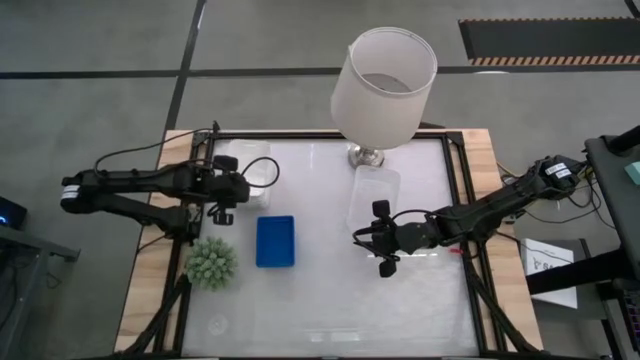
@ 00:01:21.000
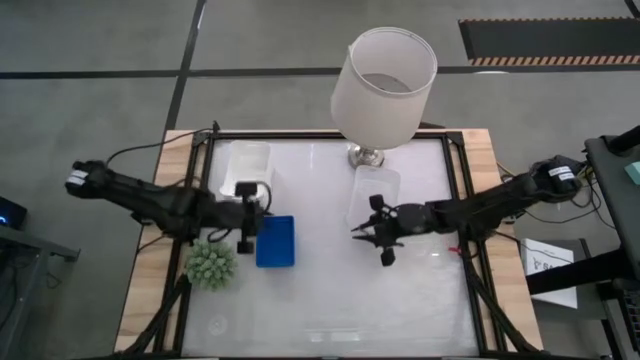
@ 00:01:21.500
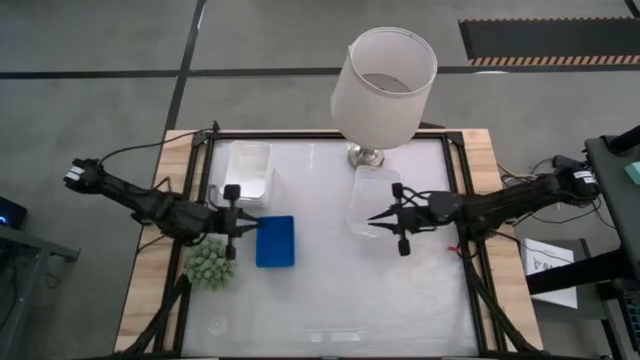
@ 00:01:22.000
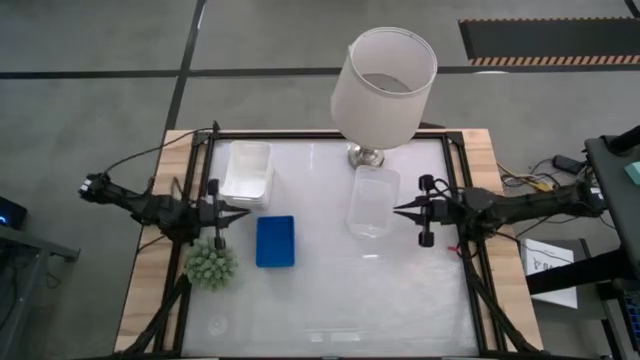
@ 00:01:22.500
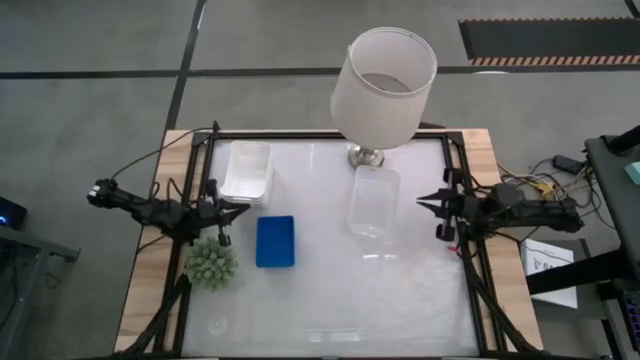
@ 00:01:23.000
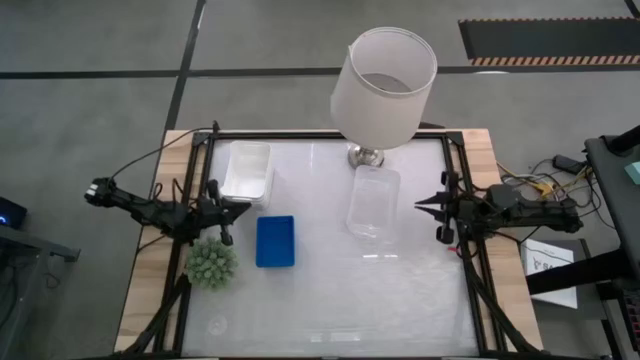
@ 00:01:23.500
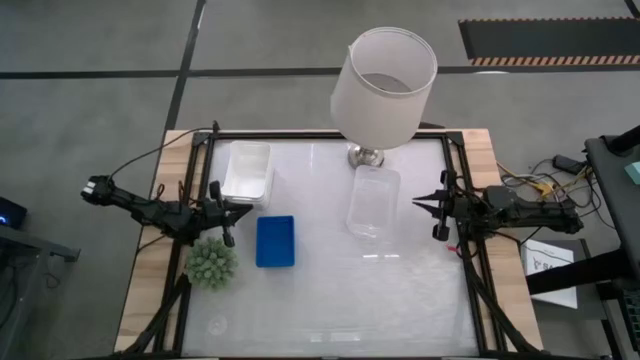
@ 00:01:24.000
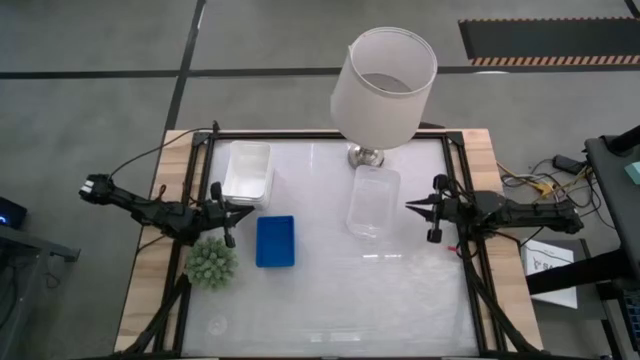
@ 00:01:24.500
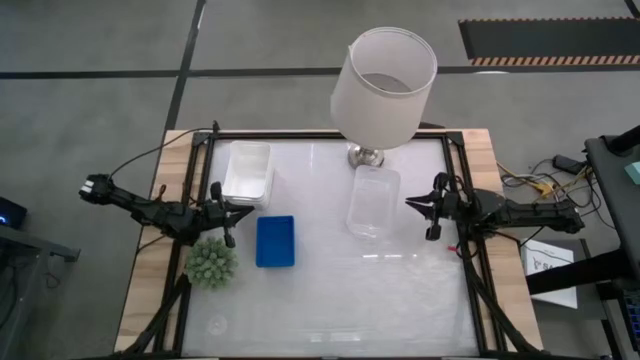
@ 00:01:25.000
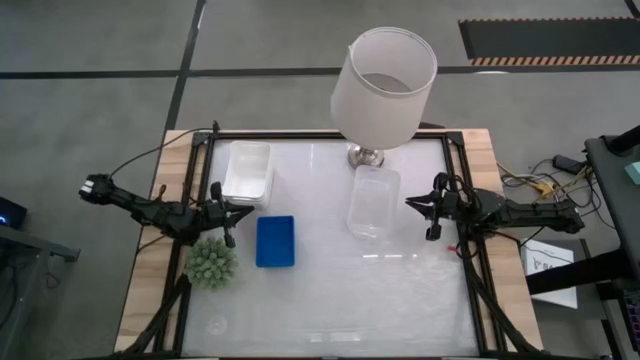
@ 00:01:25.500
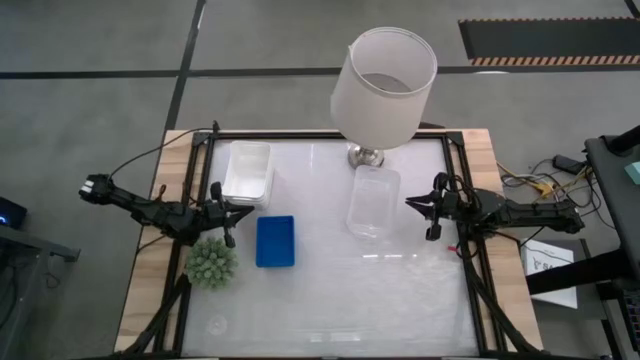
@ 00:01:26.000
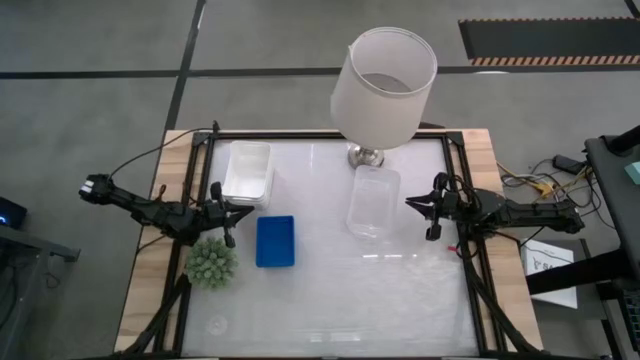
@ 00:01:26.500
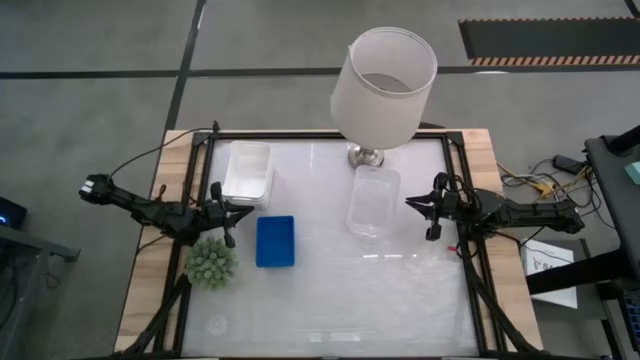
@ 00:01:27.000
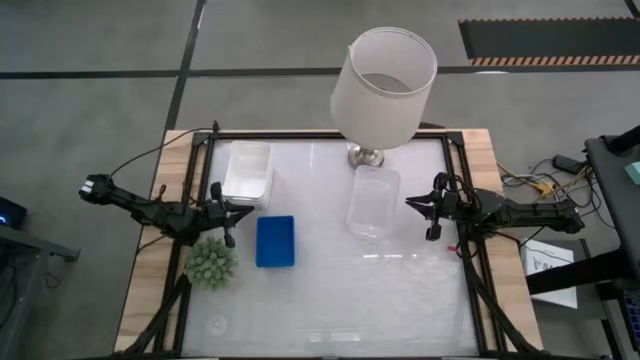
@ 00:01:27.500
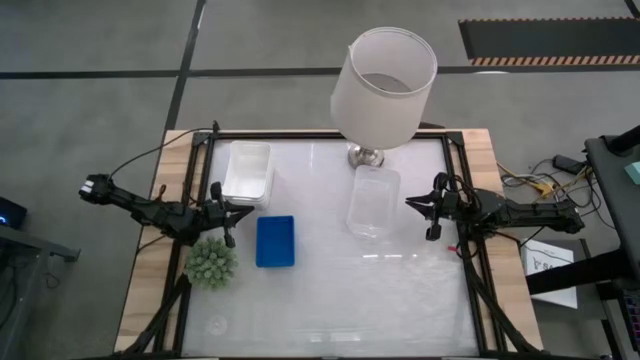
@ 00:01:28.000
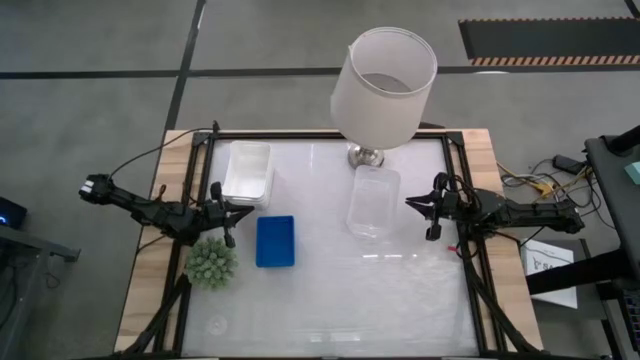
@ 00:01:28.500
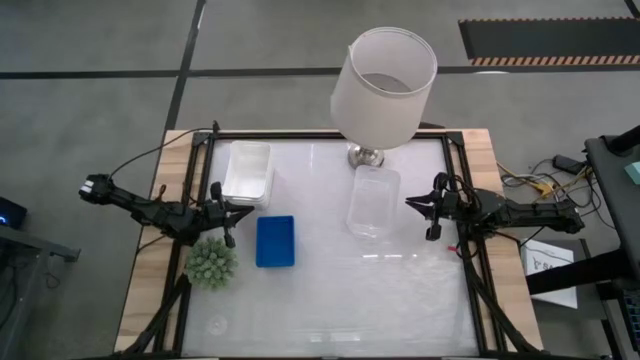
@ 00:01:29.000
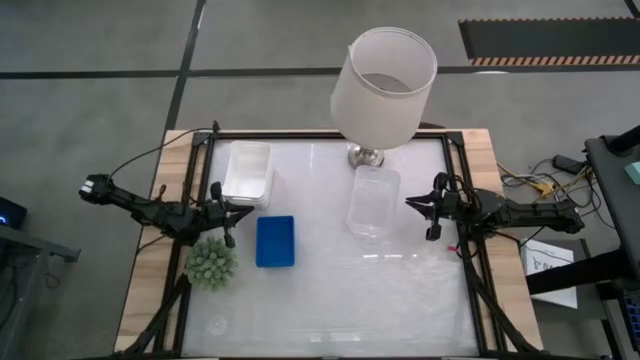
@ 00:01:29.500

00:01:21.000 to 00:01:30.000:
Return to Home Position

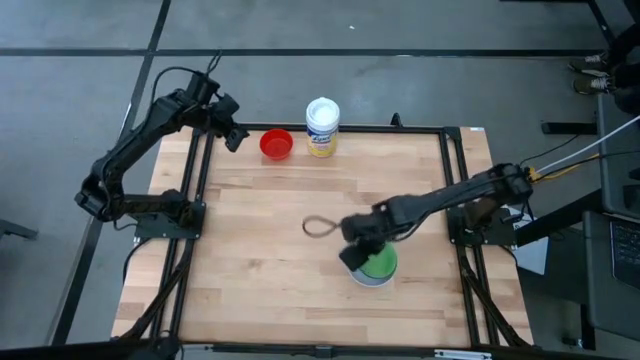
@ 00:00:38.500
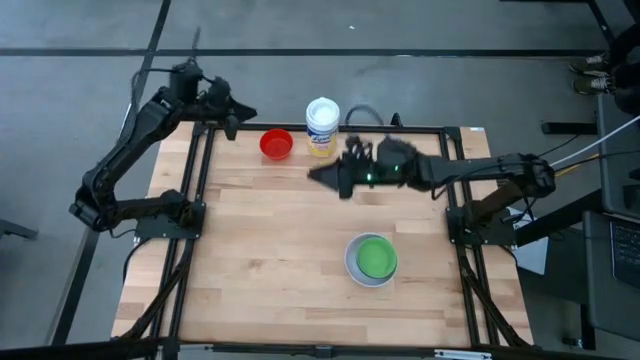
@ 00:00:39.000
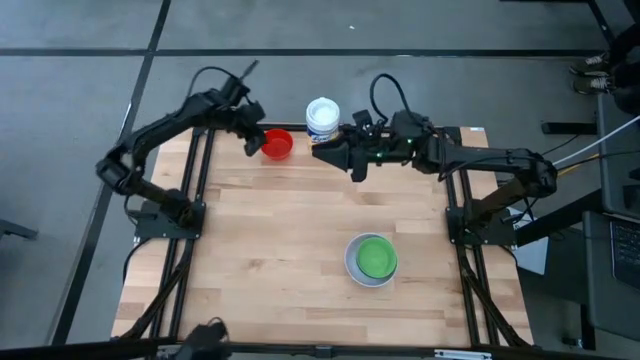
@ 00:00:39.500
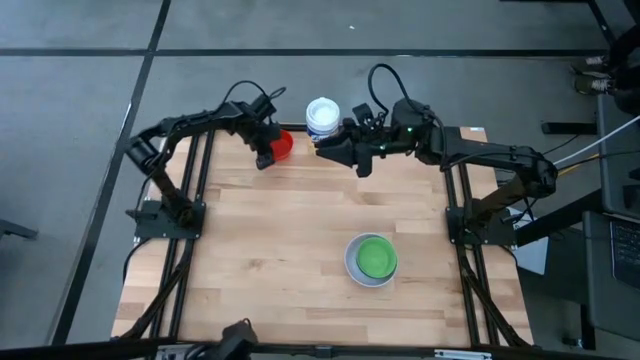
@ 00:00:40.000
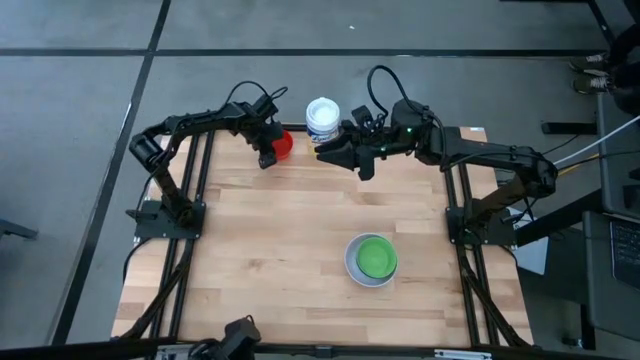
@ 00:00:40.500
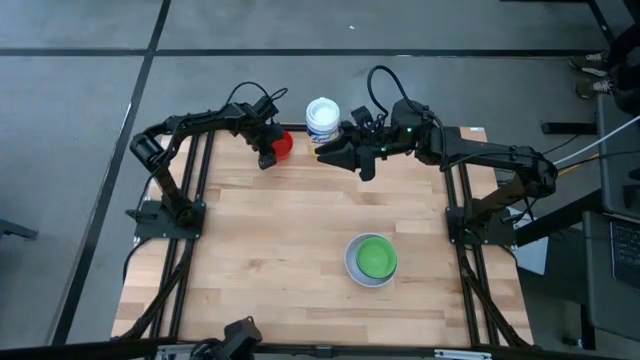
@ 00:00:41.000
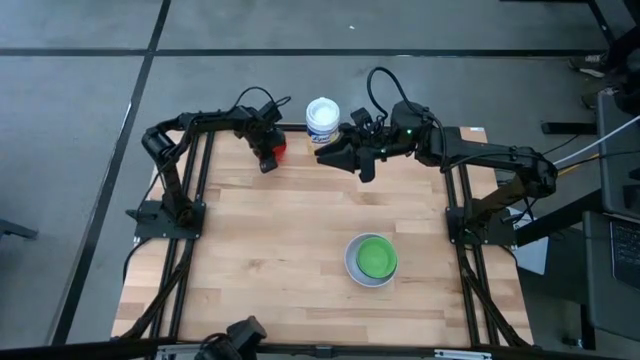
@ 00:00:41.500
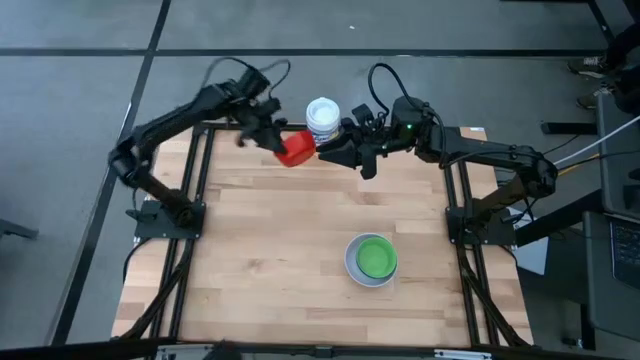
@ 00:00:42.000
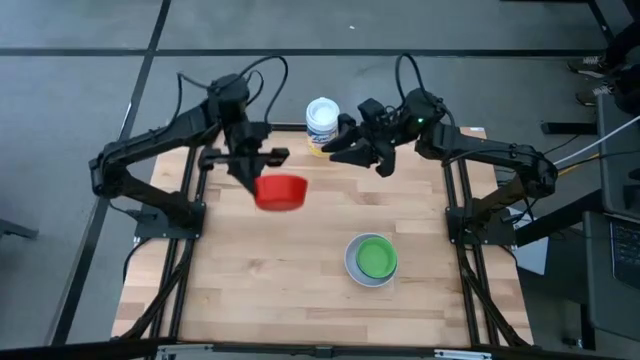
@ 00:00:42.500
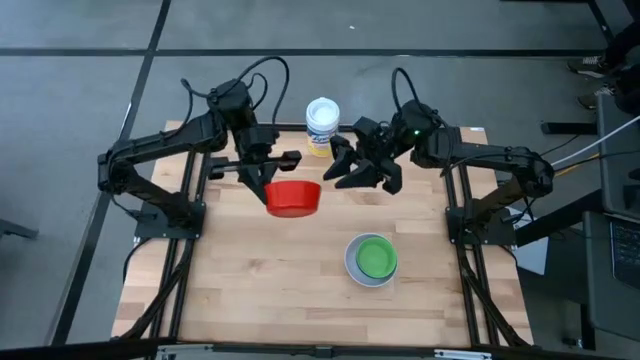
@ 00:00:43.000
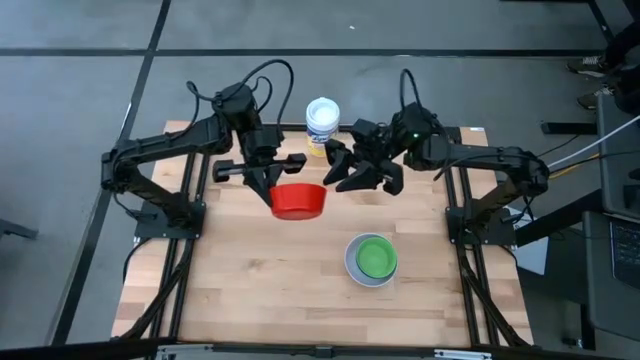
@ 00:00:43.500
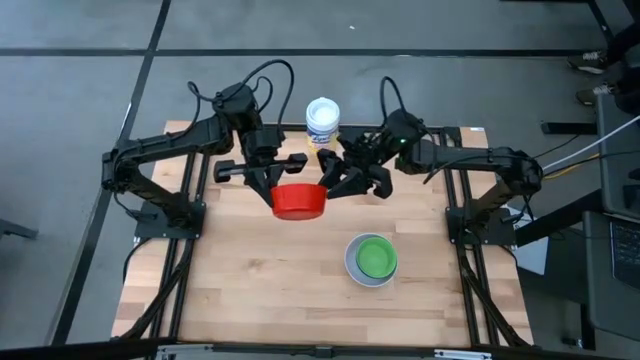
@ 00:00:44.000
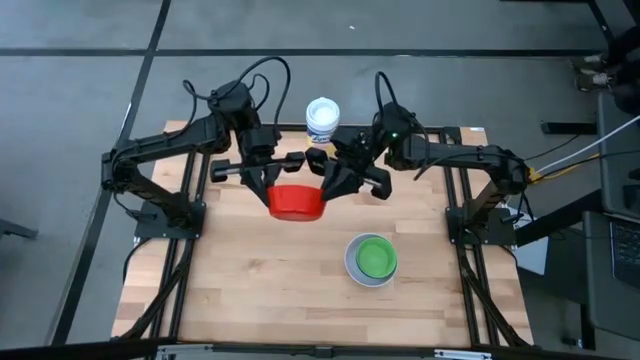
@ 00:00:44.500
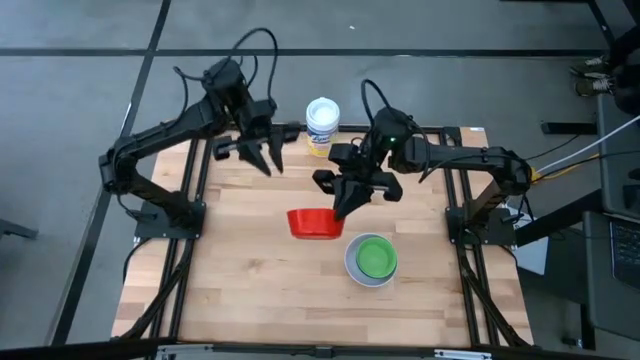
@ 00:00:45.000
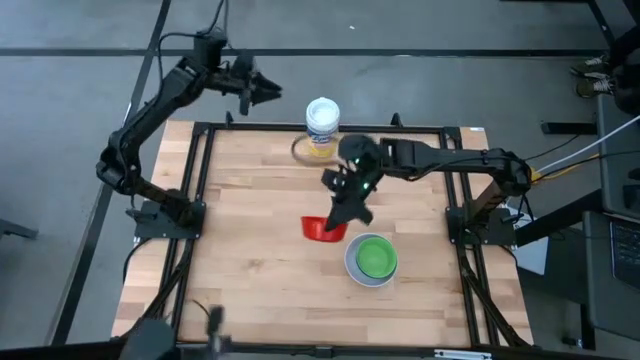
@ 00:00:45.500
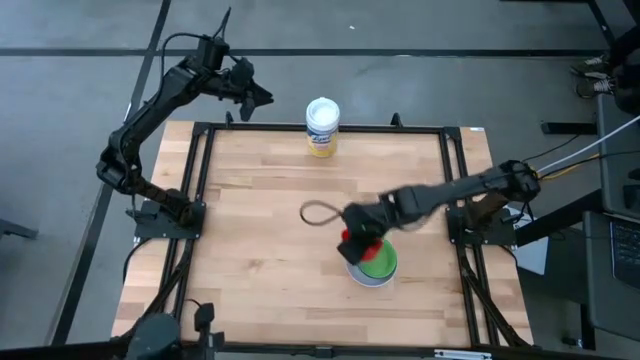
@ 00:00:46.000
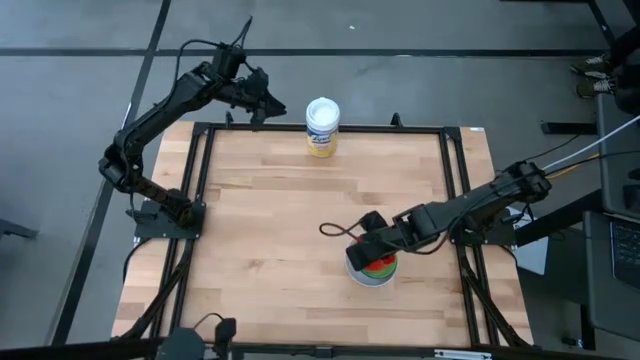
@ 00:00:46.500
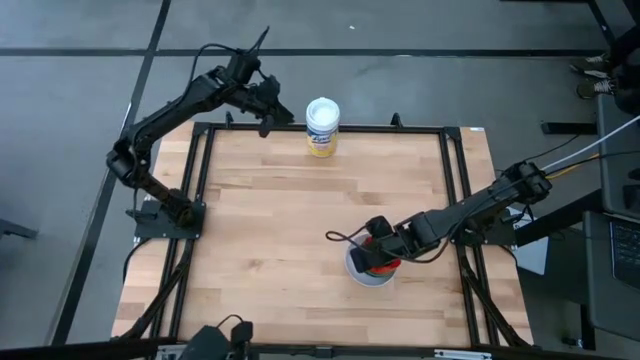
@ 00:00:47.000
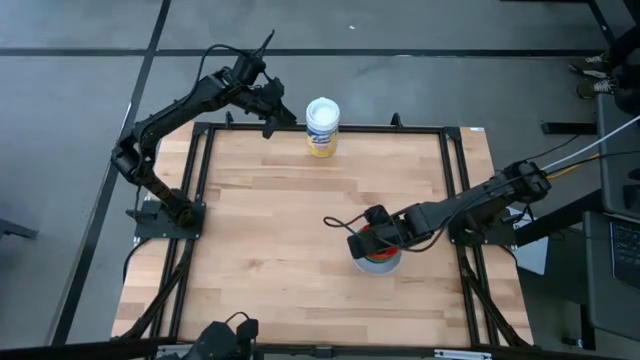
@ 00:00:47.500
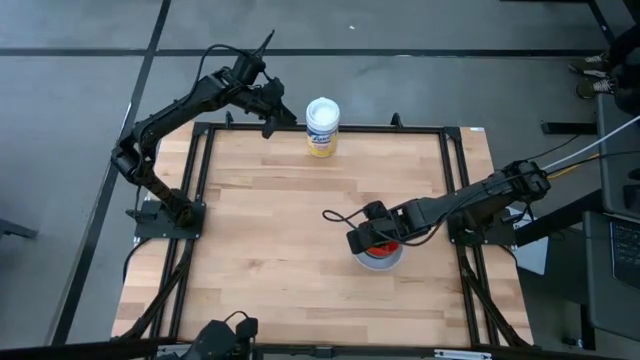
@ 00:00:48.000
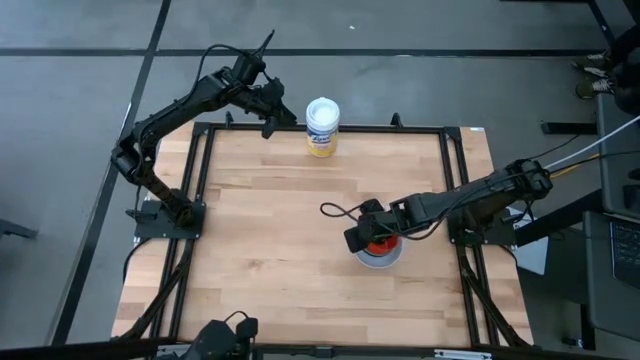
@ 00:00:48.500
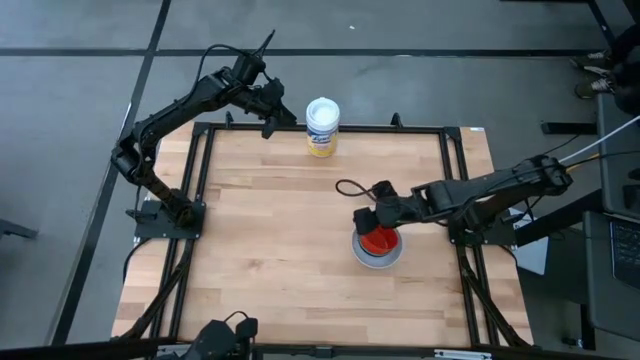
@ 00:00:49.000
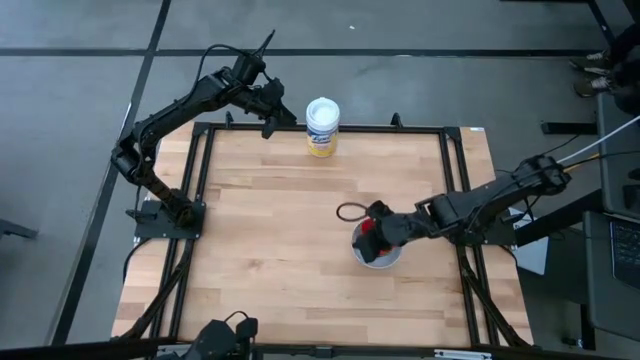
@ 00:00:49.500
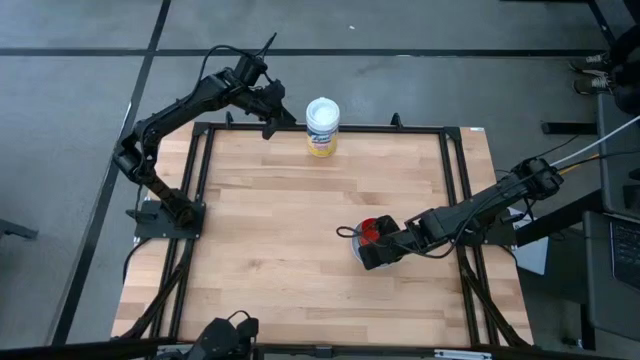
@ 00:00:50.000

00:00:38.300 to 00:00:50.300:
Stack the red bowl on top of the stacked bowls
